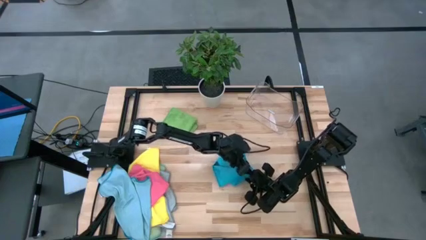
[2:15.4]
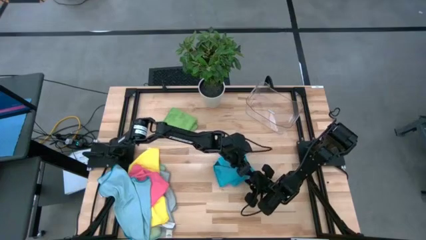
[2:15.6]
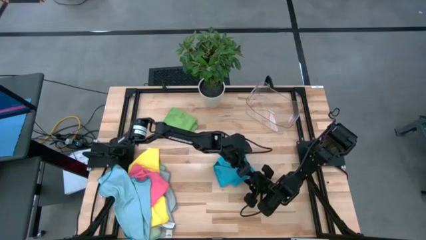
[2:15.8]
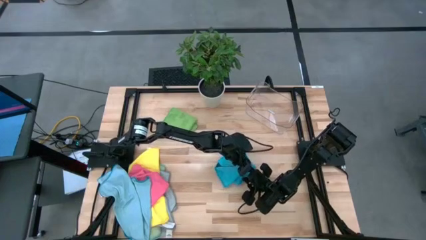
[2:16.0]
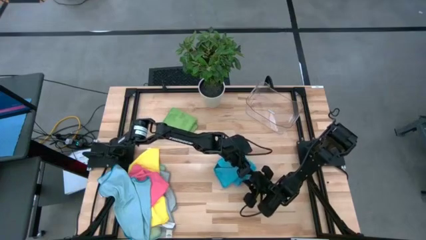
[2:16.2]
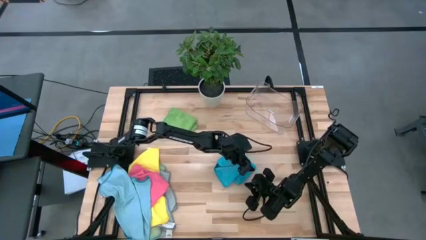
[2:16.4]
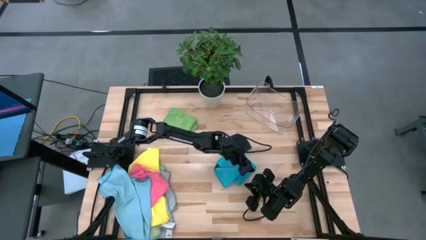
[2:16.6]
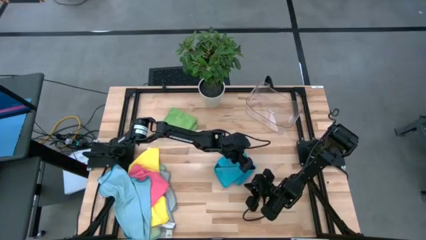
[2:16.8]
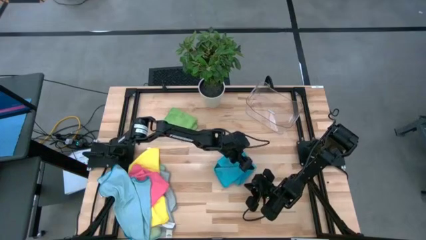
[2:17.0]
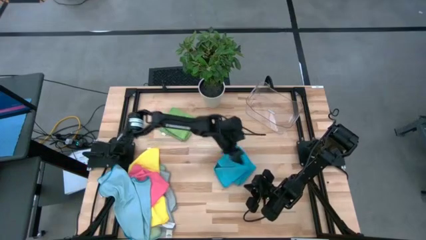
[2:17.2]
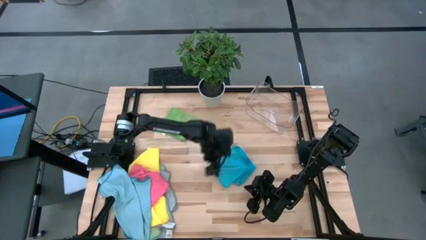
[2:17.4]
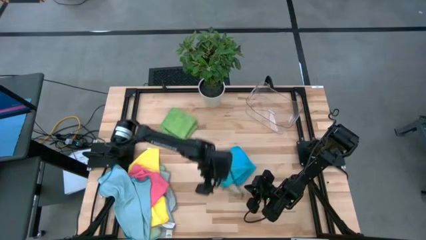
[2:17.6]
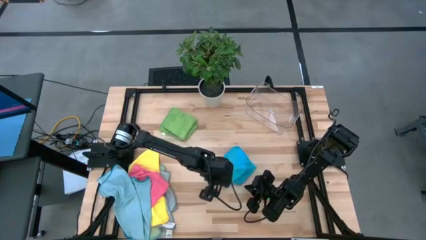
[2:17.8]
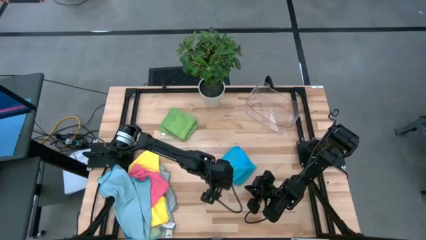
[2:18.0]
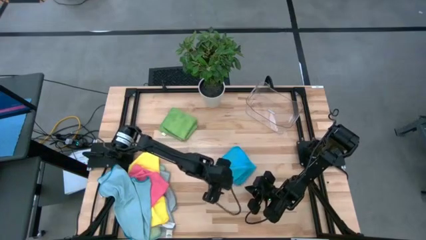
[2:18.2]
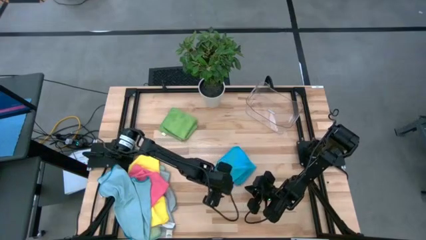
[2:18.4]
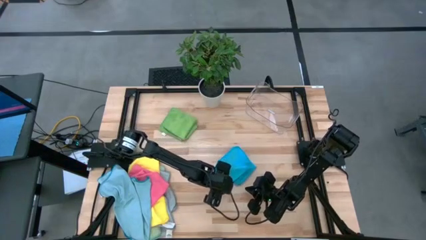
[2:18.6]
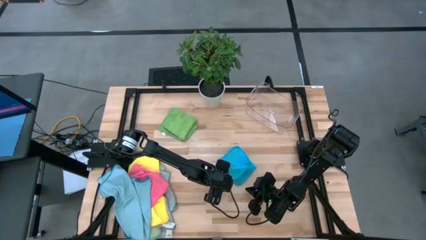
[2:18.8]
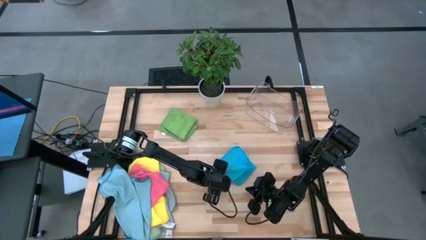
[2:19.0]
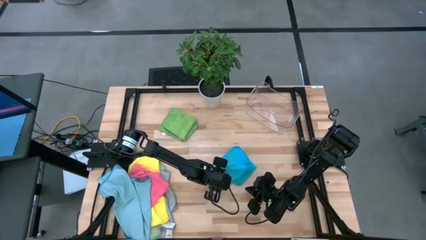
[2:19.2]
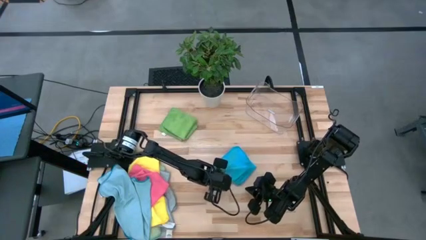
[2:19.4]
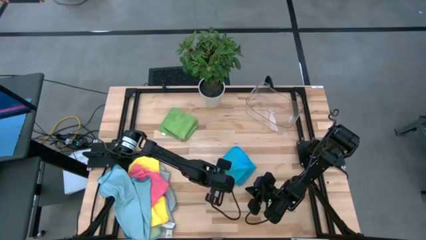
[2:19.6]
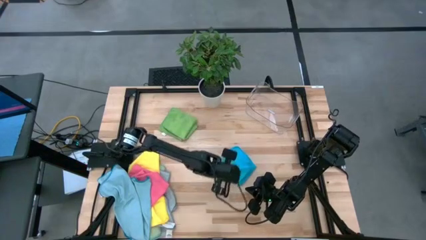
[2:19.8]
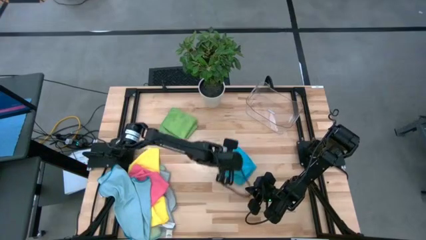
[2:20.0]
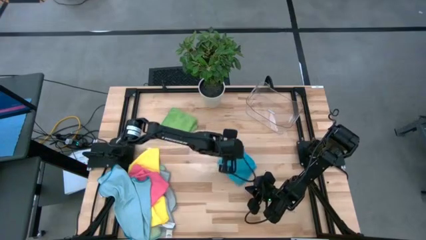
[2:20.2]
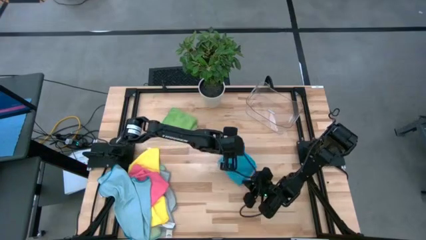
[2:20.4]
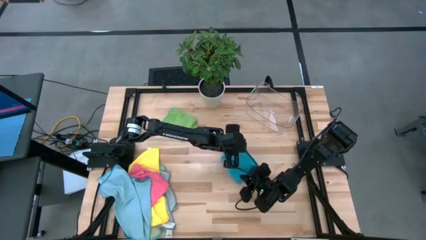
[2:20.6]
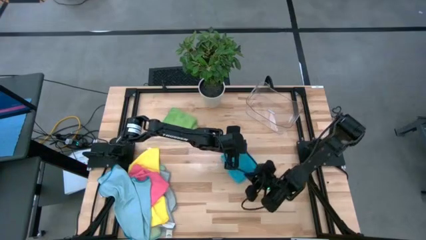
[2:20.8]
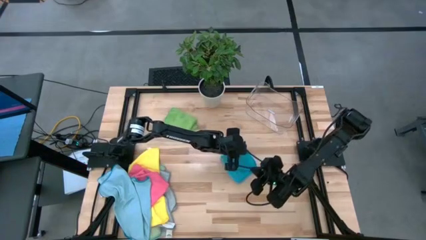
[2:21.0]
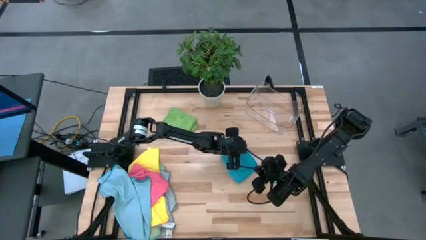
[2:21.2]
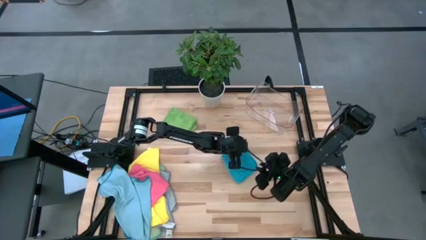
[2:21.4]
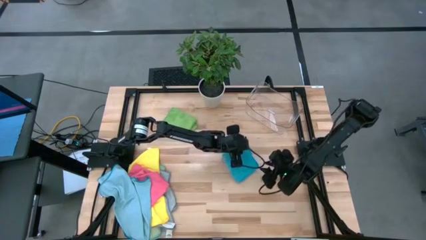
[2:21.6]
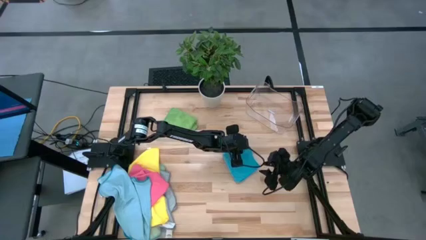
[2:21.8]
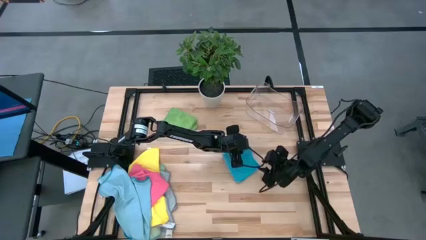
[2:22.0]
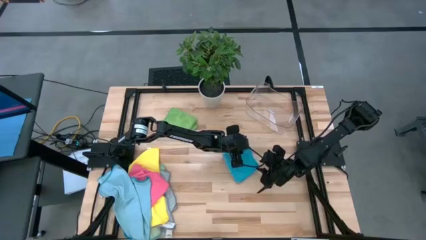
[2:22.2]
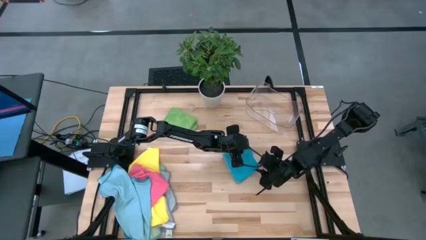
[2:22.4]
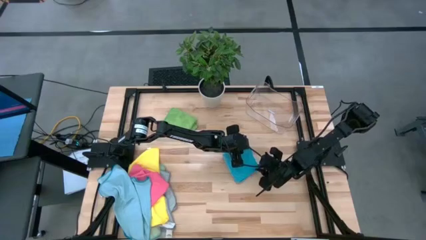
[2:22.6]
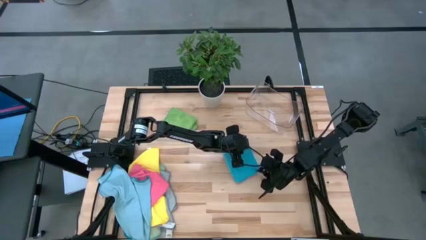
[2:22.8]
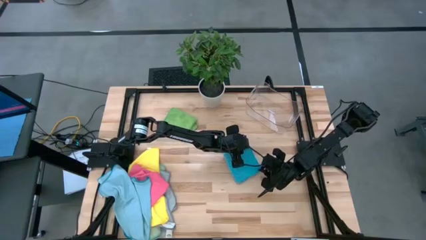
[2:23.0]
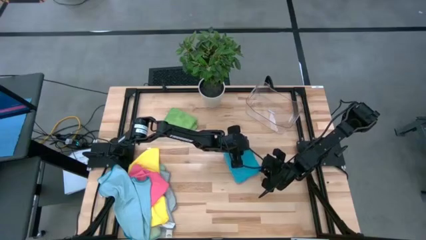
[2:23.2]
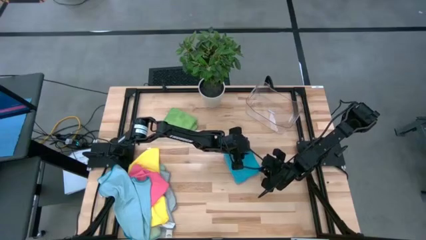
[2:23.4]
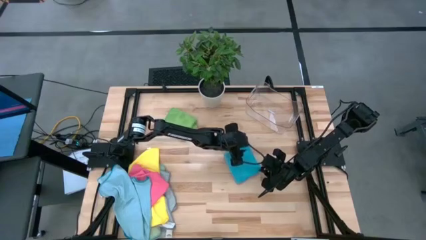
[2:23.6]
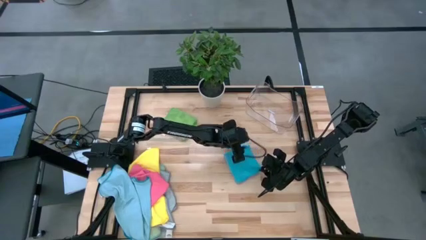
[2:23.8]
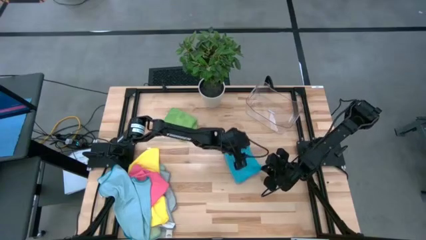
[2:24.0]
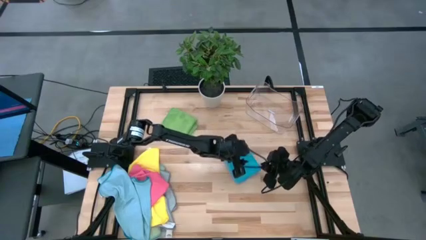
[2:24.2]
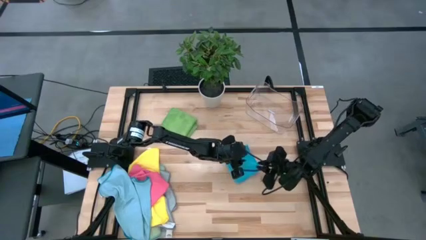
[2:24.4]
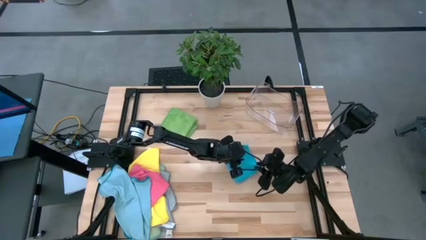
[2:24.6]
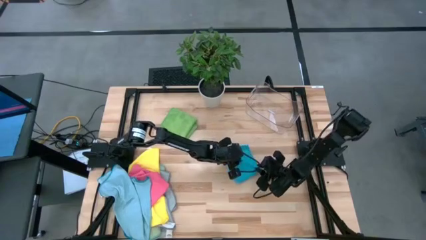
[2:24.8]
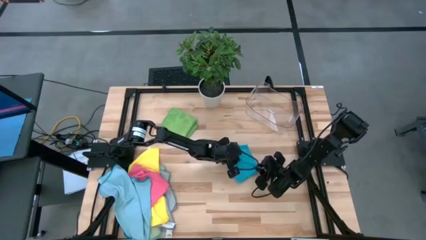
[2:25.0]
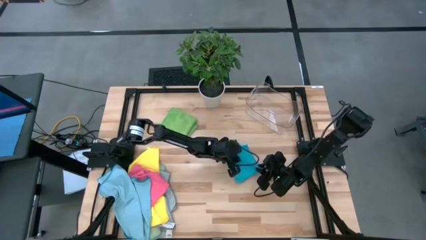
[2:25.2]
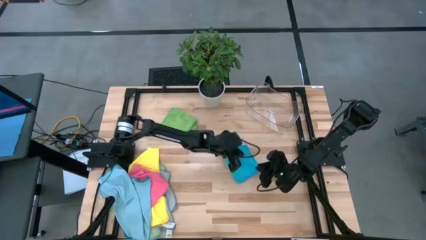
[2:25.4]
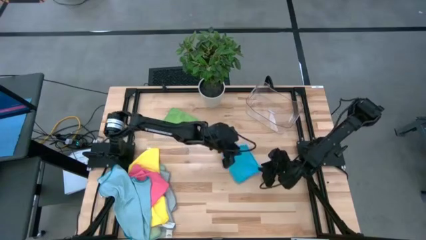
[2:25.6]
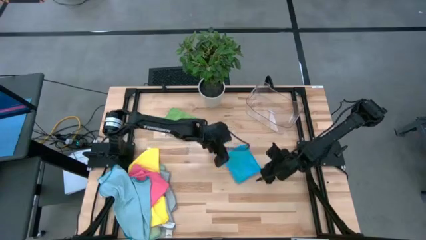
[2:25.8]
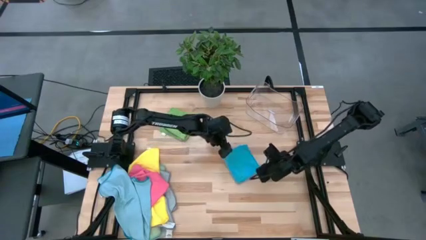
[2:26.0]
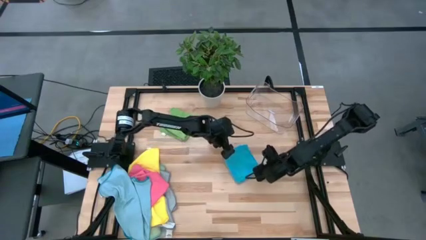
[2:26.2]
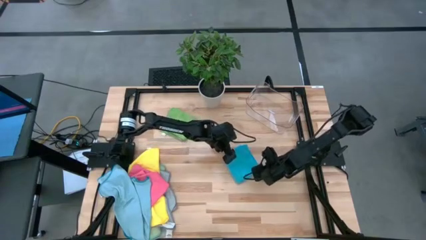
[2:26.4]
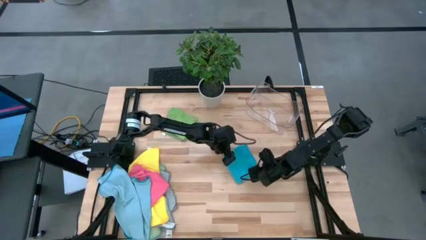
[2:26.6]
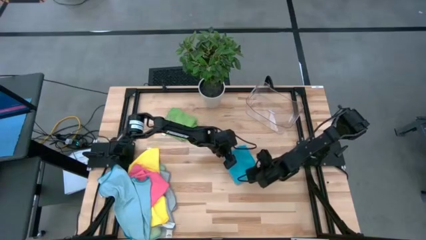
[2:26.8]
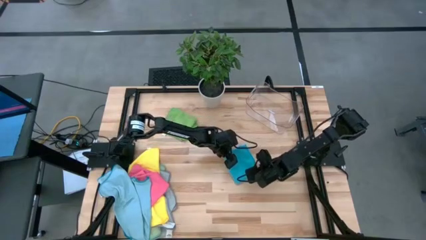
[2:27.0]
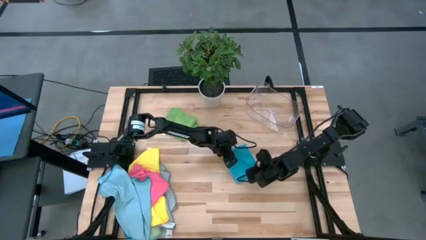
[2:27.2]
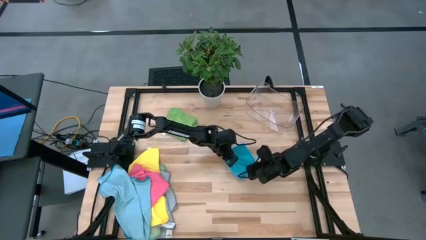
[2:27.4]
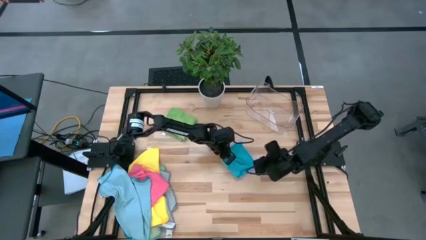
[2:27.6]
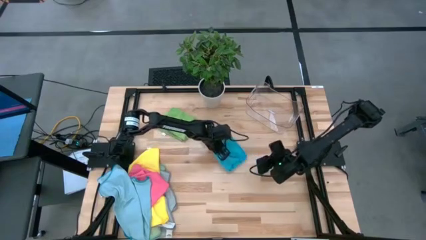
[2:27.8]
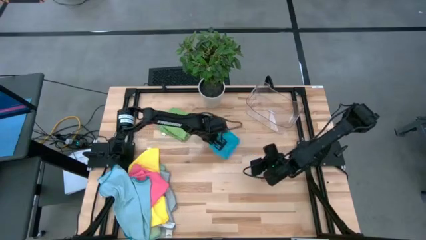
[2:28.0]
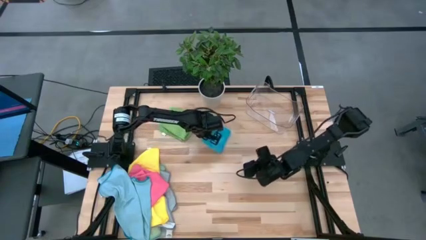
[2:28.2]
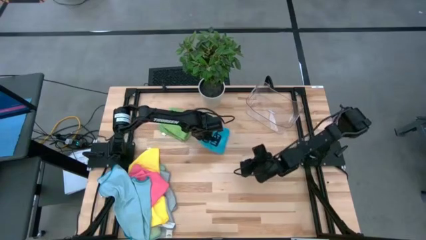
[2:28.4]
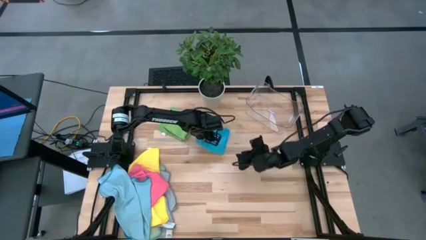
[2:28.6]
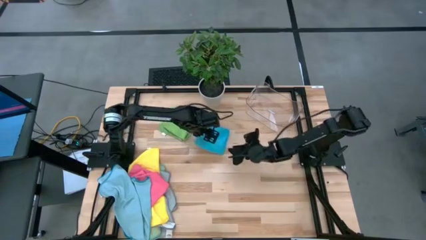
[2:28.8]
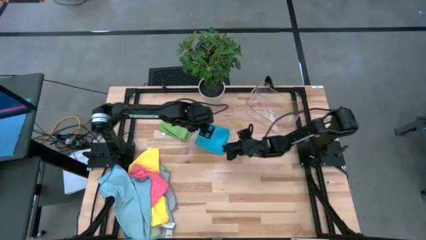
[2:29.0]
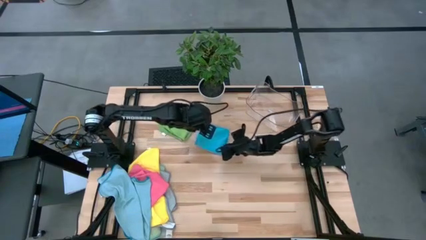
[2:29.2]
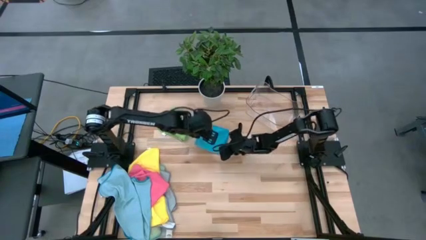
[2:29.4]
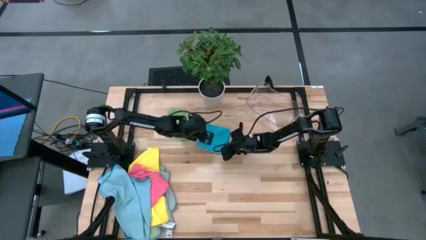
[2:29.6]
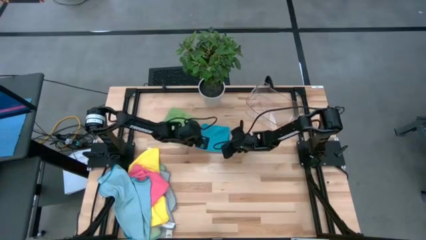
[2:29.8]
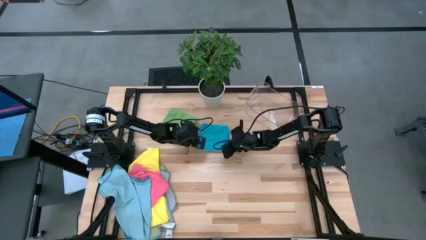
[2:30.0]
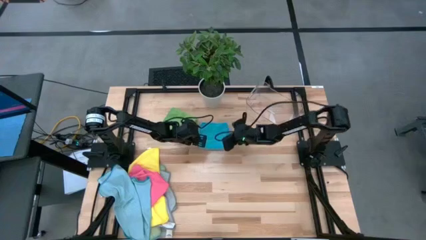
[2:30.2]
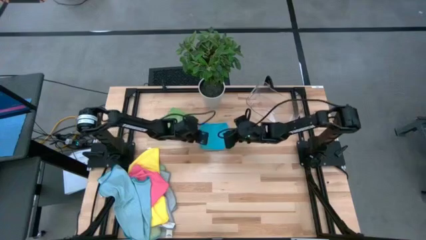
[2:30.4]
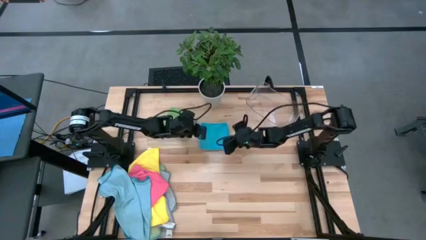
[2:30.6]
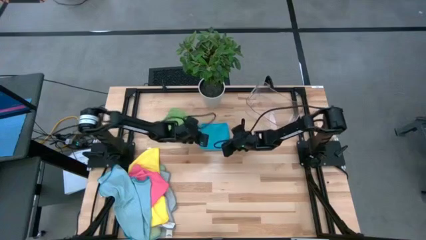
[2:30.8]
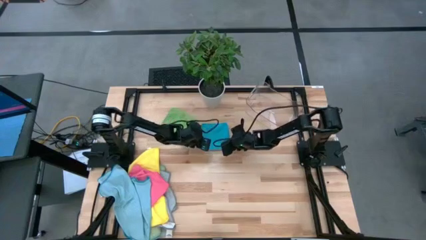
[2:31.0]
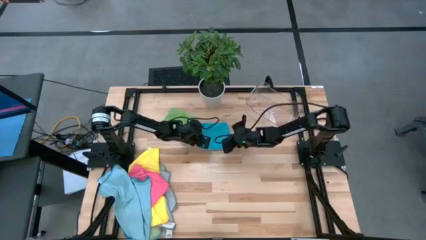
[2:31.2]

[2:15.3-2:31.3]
Task: Fold microfiber towels
Fold the blue microfiber towel

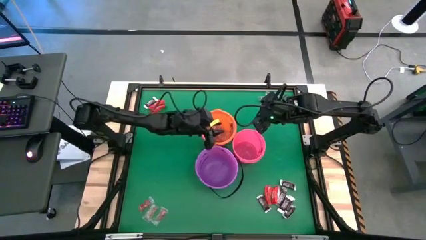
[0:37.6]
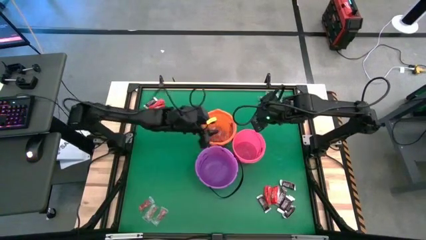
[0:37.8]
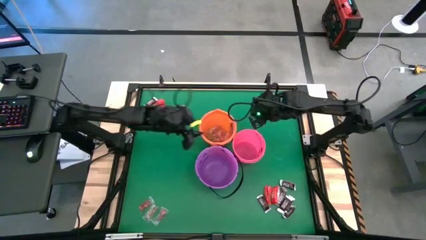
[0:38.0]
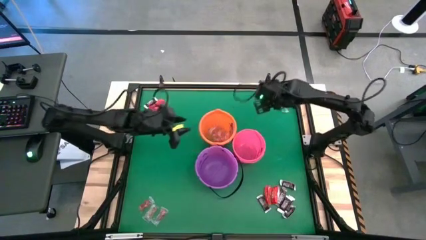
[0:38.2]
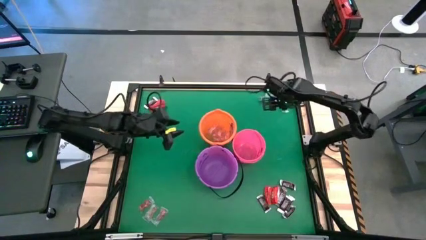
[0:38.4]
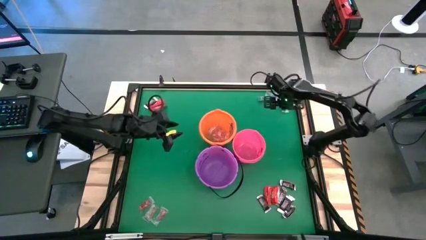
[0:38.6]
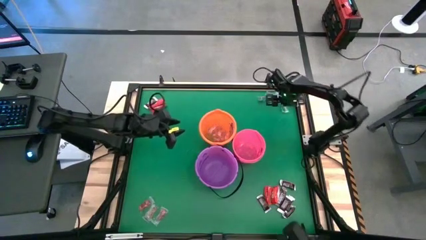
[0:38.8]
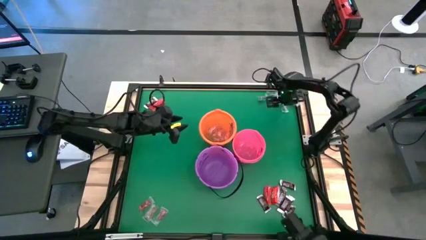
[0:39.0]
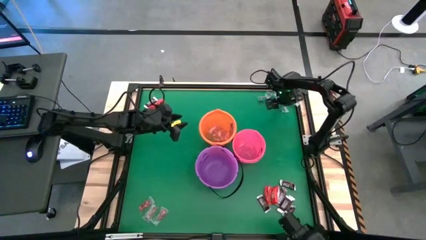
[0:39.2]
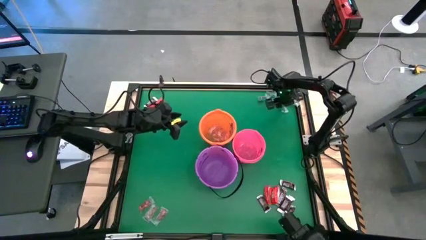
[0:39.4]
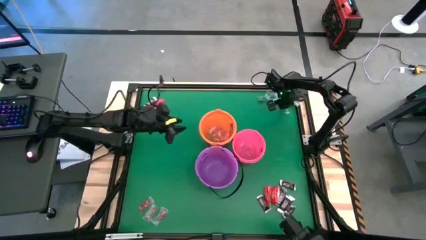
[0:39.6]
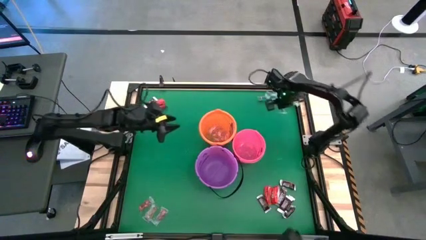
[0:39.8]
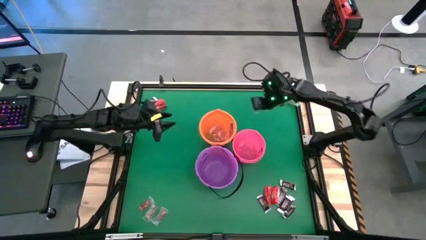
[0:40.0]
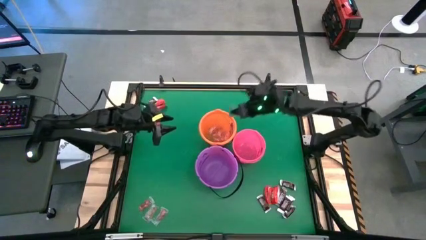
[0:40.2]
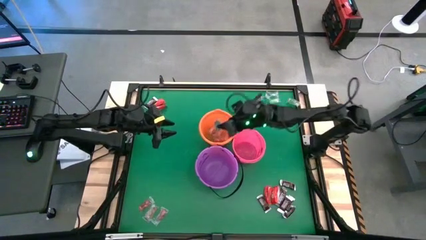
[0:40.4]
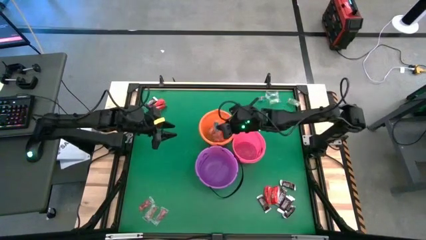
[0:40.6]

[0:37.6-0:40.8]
Task: Sort candy by brand, put in halloween buckets
Put the blue gummy into the orange bucket
